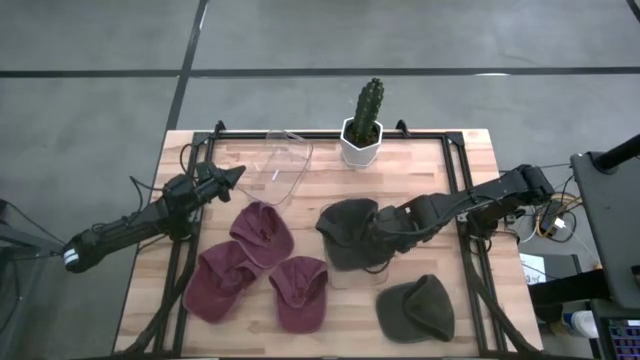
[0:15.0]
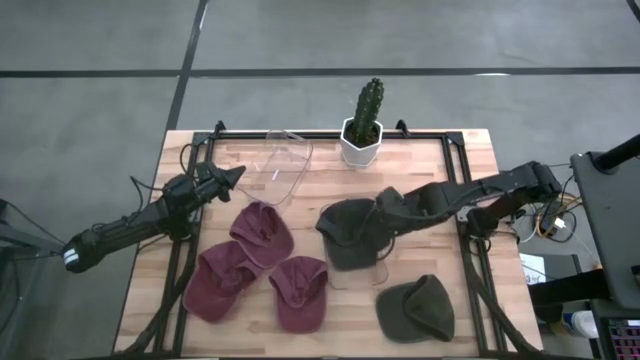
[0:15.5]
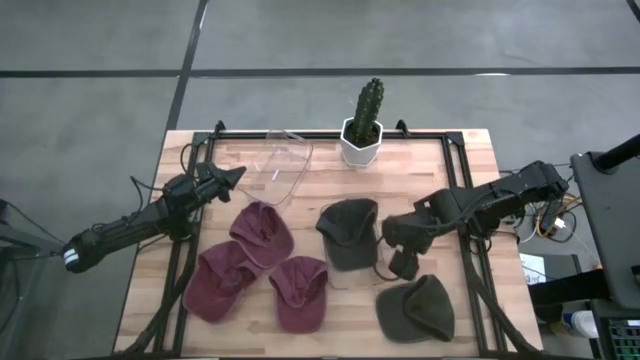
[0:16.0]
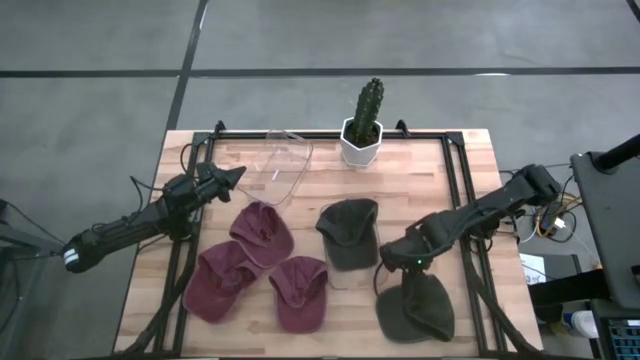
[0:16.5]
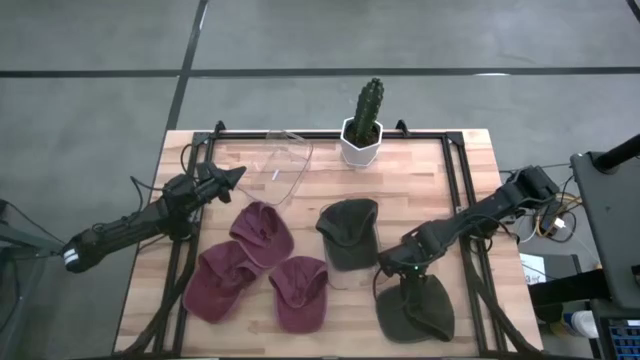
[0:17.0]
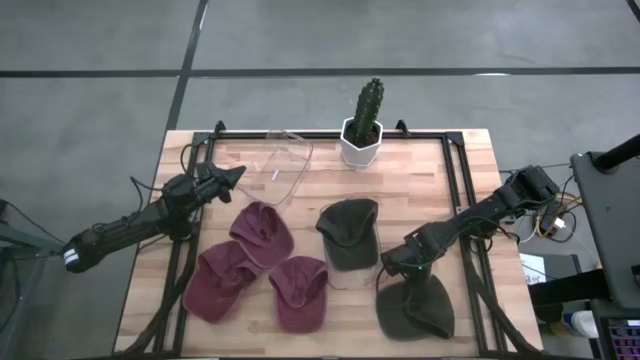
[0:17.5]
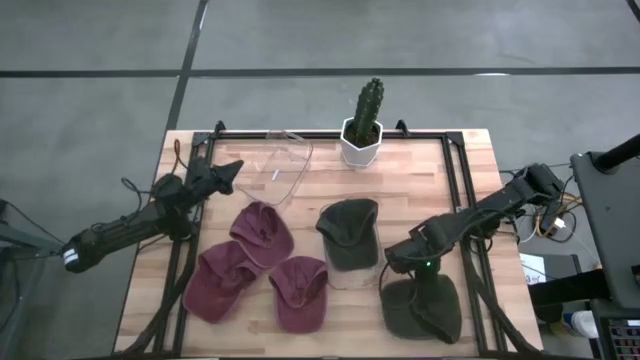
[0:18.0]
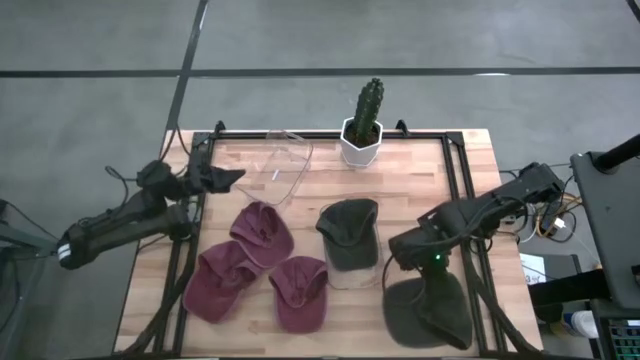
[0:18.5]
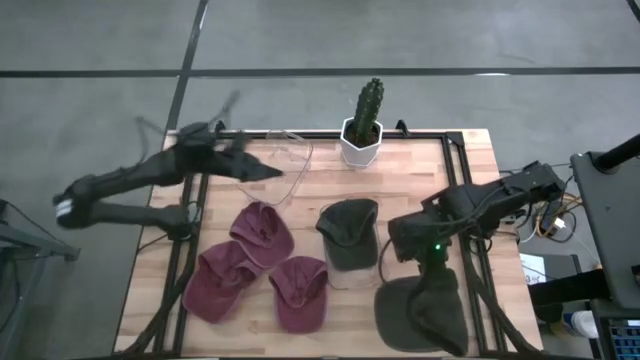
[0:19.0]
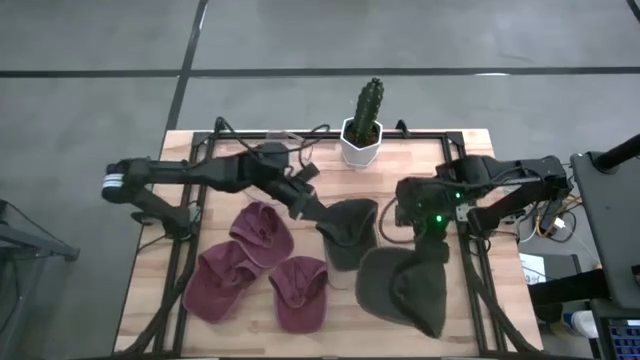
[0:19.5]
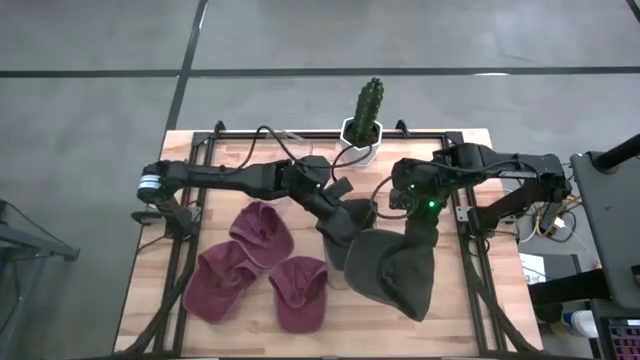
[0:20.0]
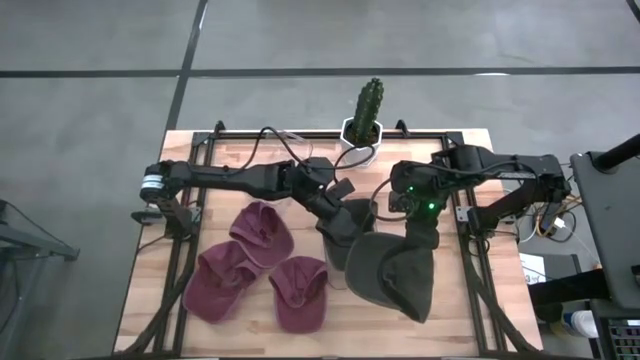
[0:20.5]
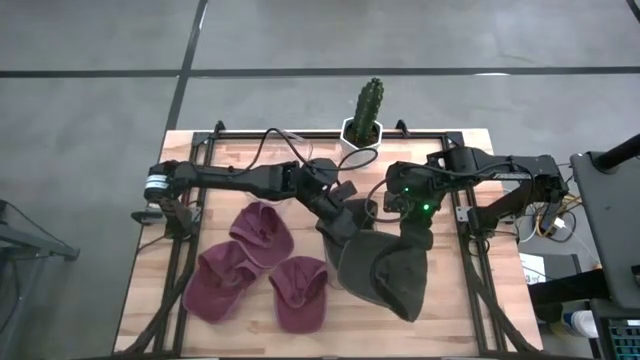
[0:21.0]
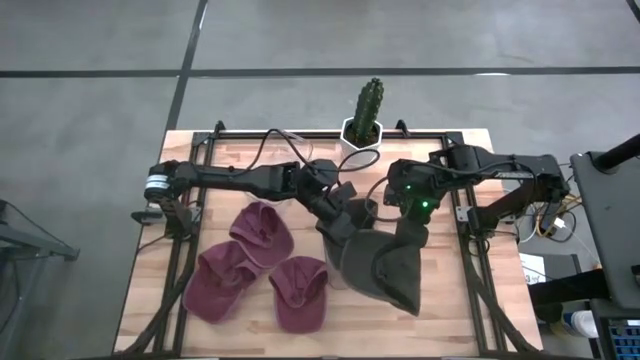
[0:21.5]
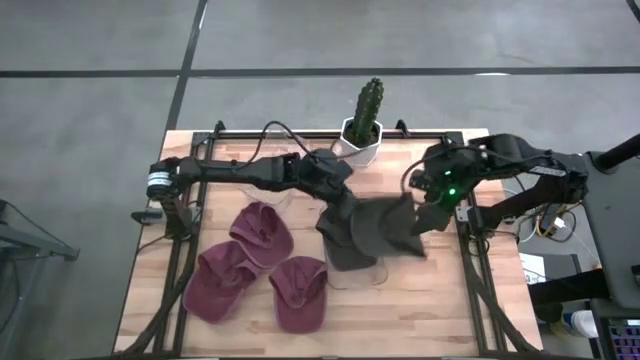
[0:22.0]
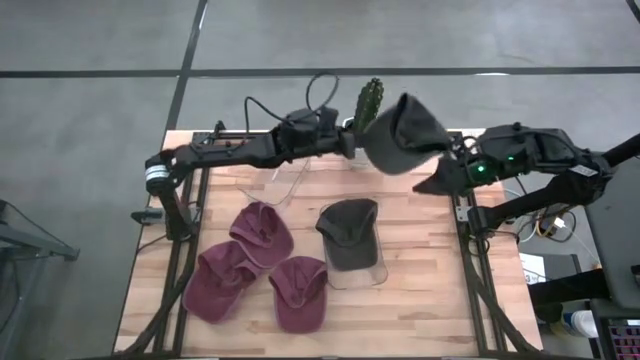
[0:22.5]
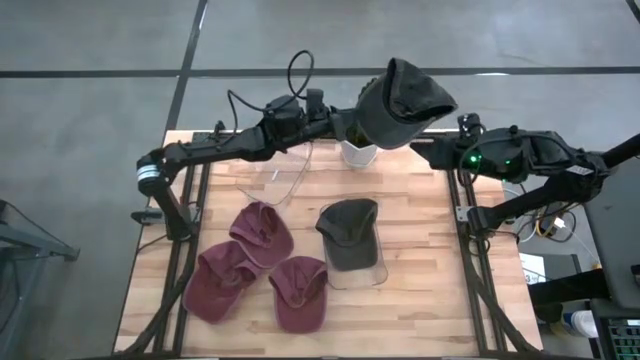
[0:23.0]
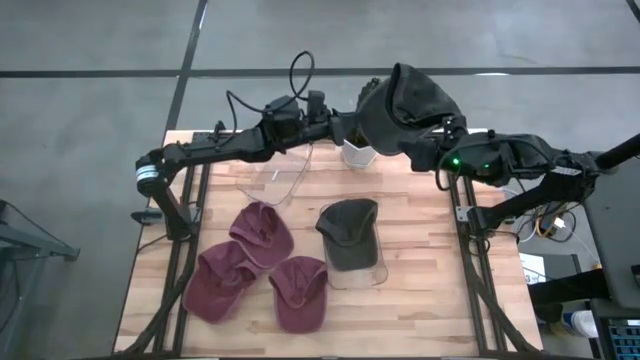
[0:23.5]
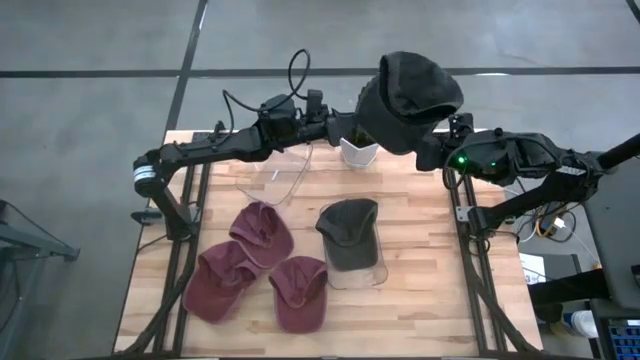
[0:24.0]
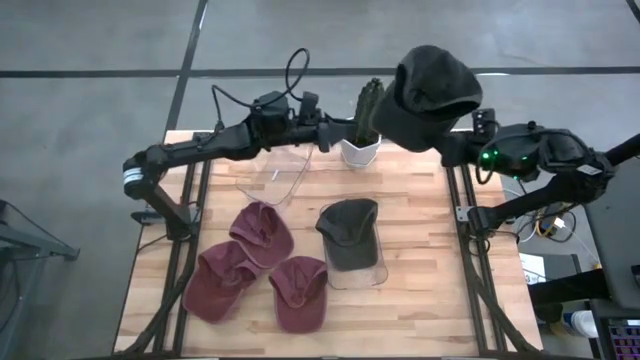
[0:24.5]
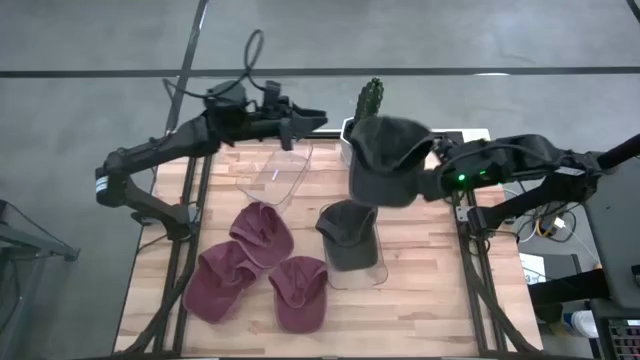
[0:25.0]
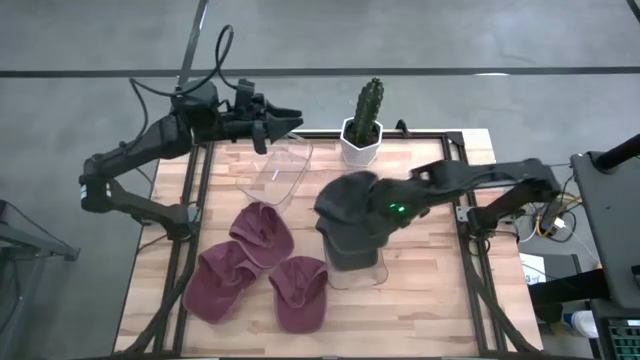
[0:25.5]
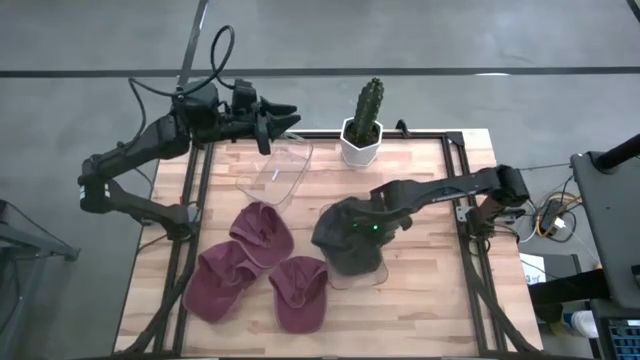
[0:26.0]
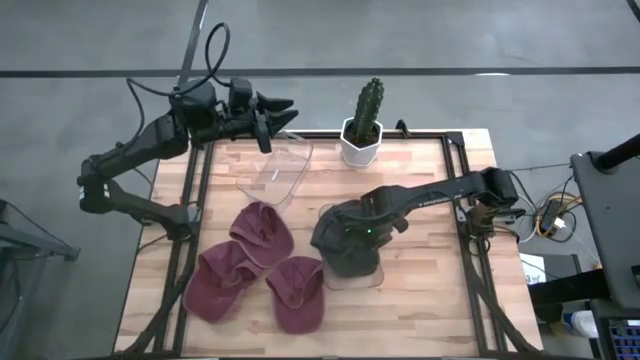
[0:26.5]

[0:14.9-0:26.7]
Task: Pick & Place hat
Put the black cap into the bottom transparent bin

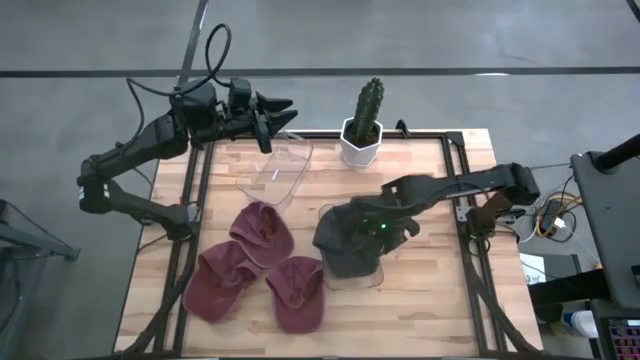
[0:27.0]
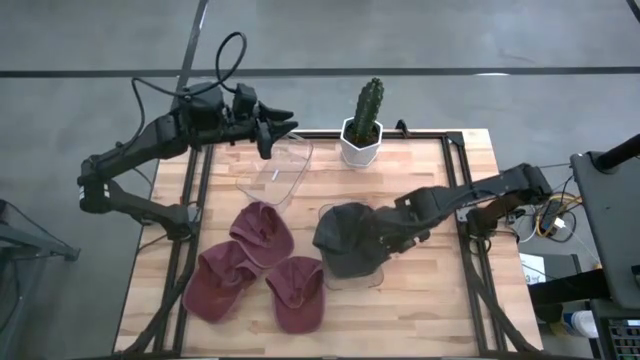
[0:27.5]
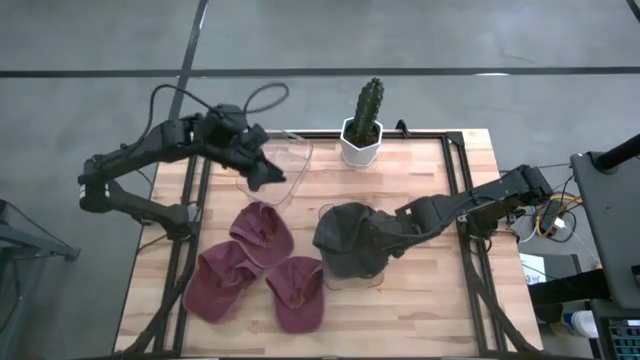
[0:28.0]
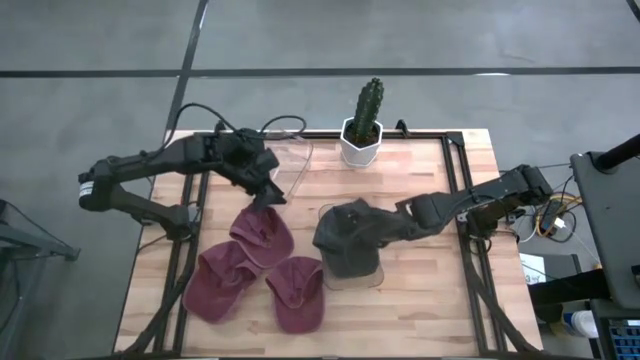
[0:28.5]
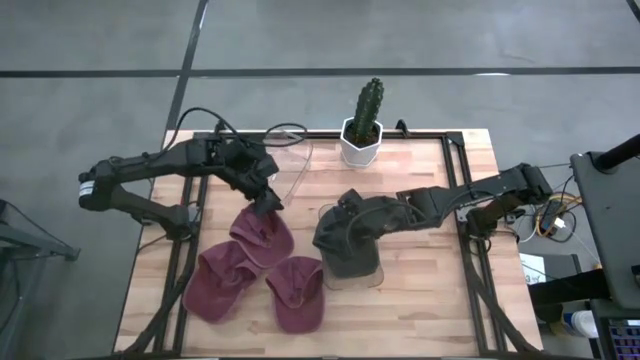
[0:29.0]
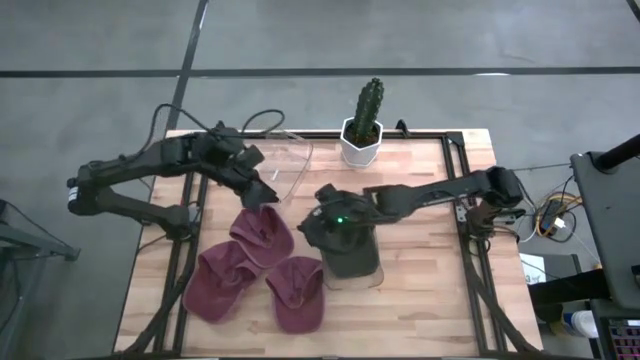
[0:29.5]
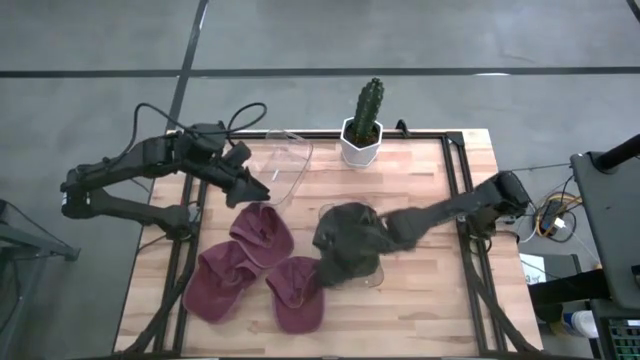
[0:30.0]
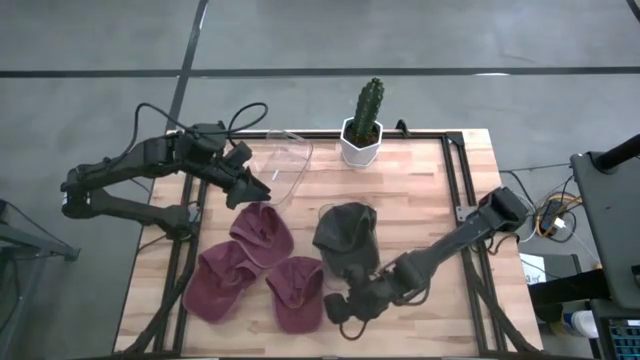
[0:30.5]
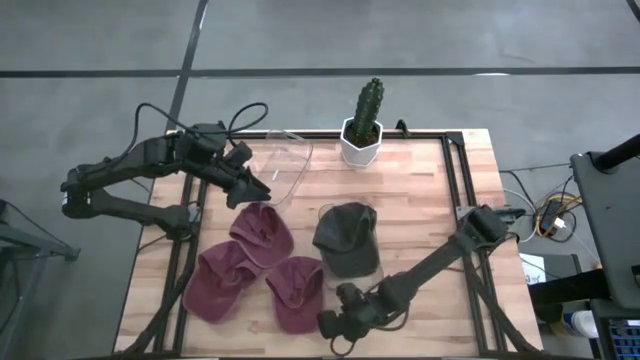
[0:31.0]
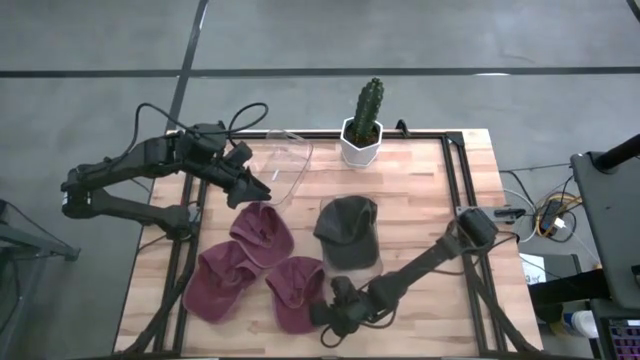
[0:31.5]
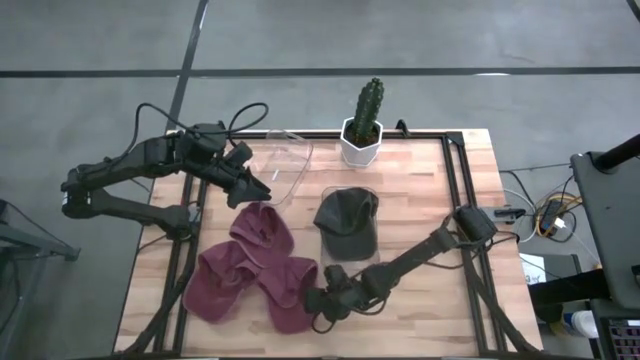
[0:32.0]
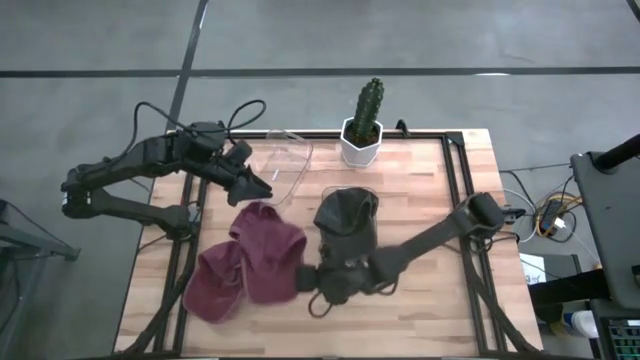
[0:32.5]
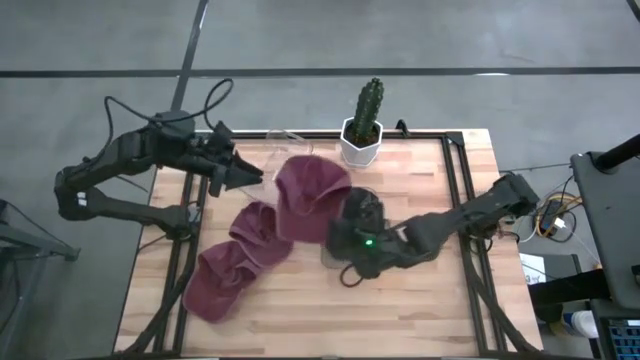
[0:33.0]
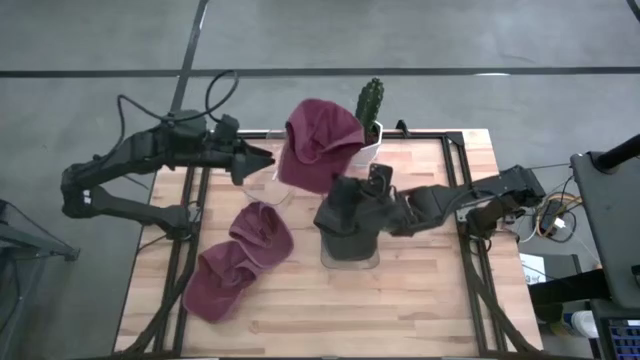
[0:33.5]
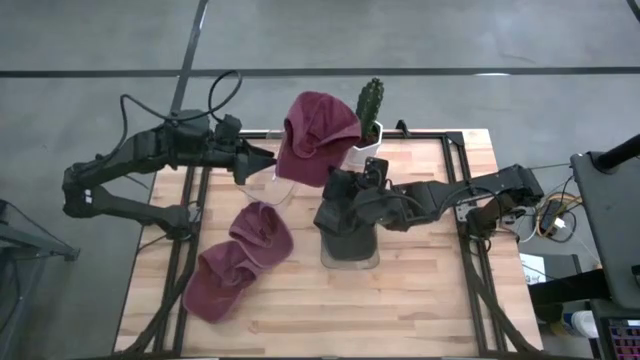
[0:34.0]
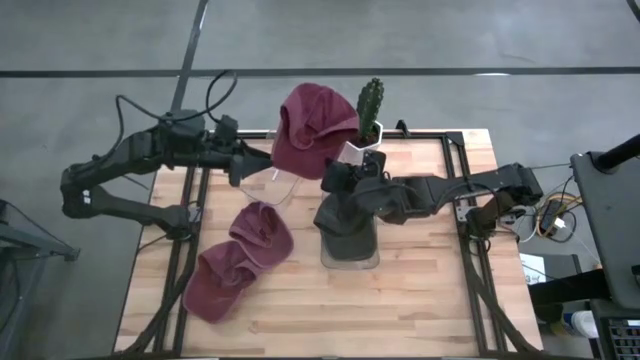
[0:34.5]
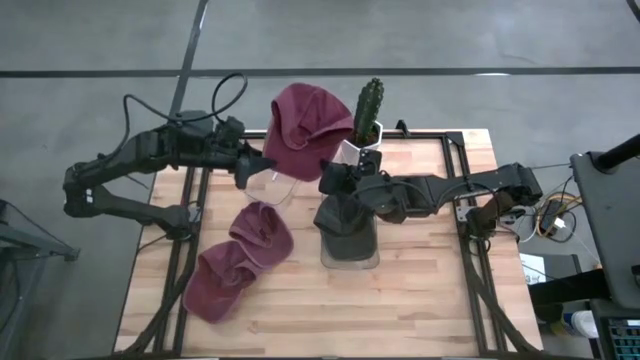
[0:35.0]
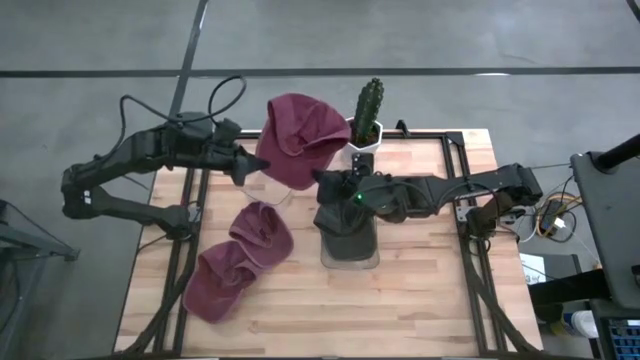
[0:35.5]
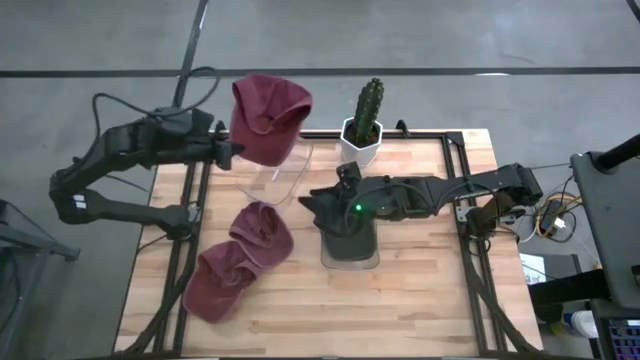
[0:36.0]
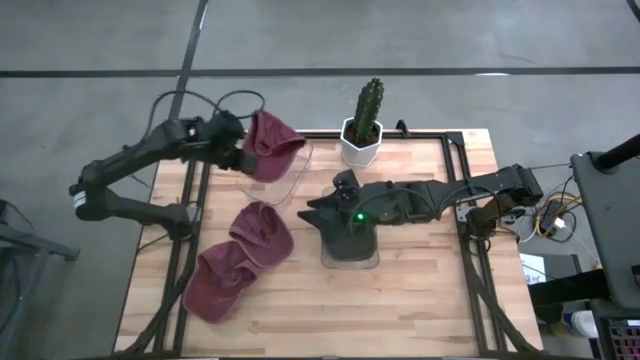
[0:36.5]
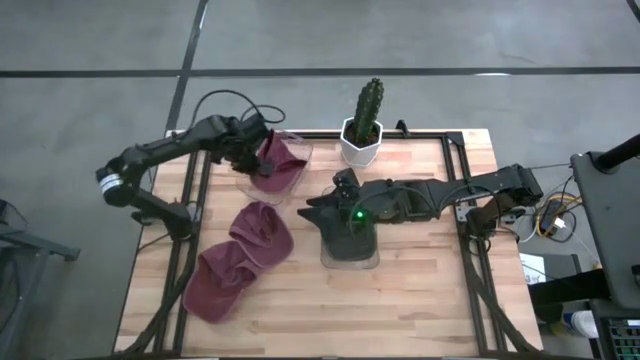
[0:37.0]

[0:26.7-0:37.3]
Put the bottom right red cap into the top transparent bin
